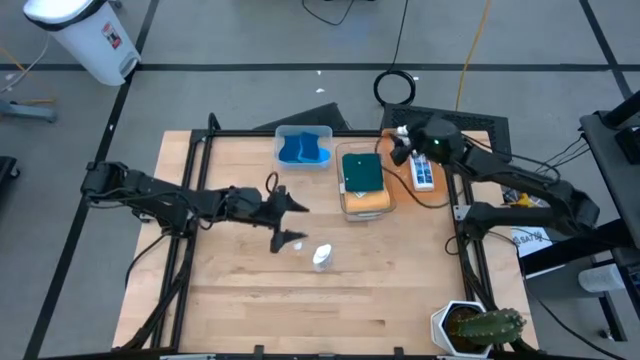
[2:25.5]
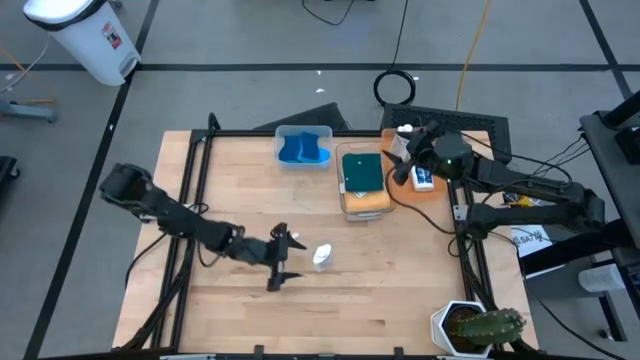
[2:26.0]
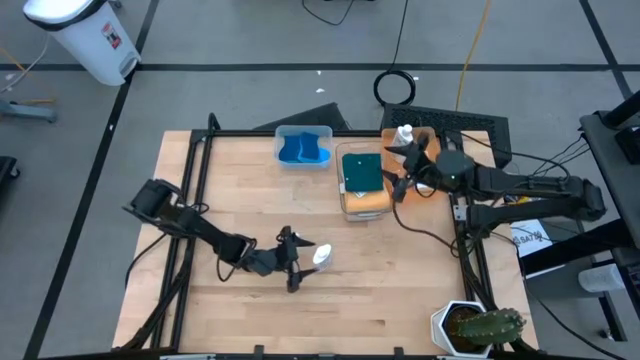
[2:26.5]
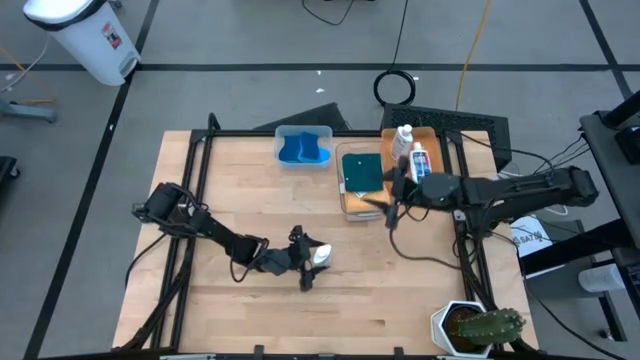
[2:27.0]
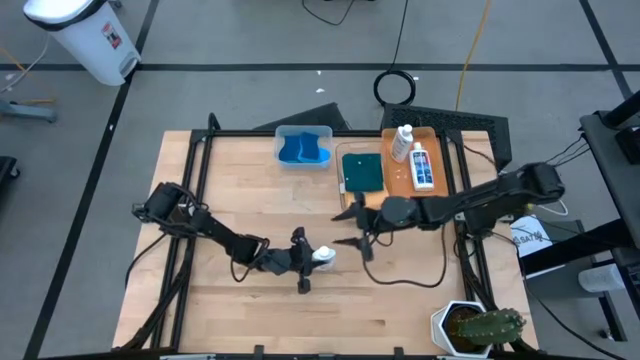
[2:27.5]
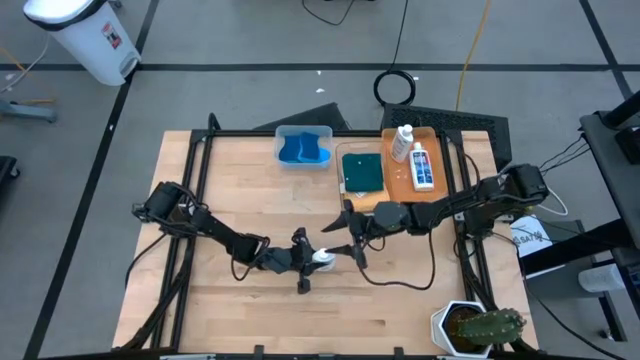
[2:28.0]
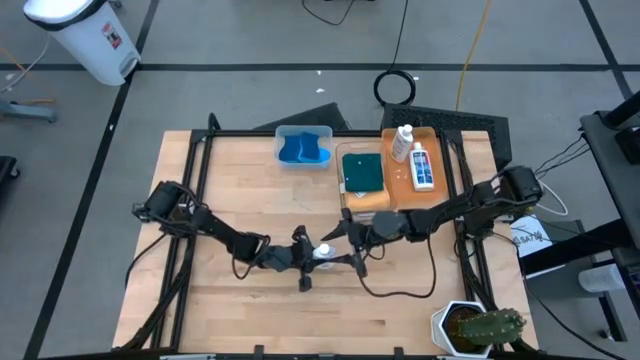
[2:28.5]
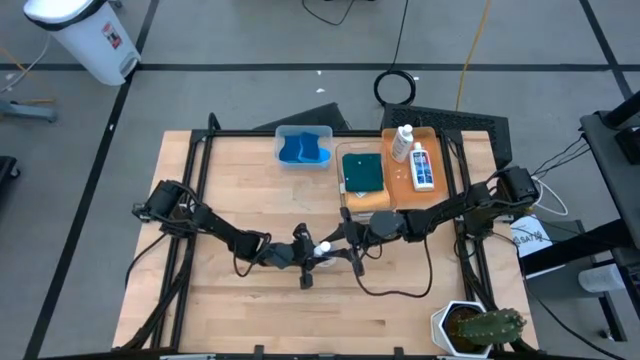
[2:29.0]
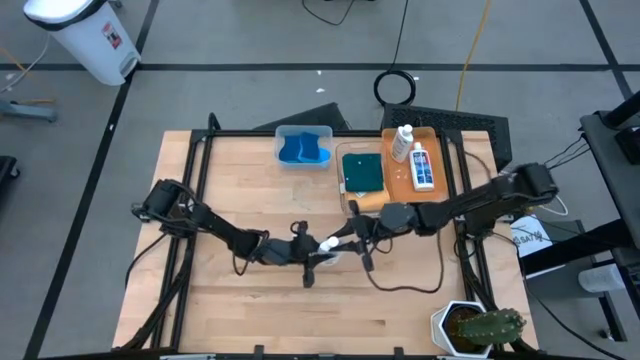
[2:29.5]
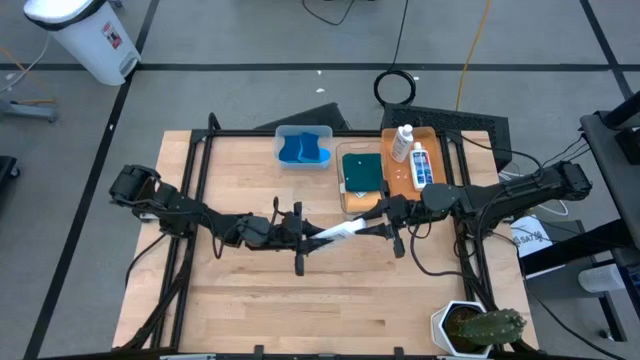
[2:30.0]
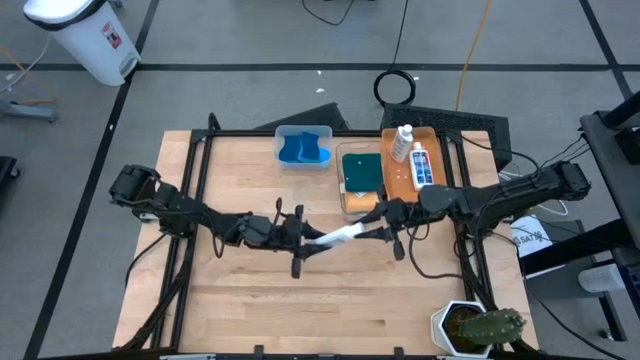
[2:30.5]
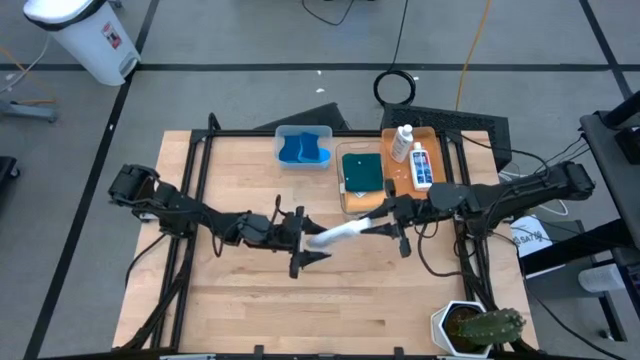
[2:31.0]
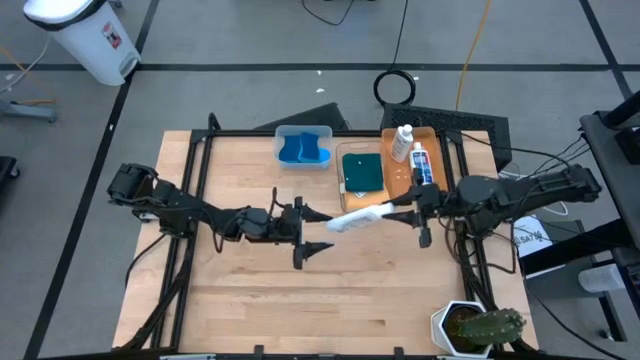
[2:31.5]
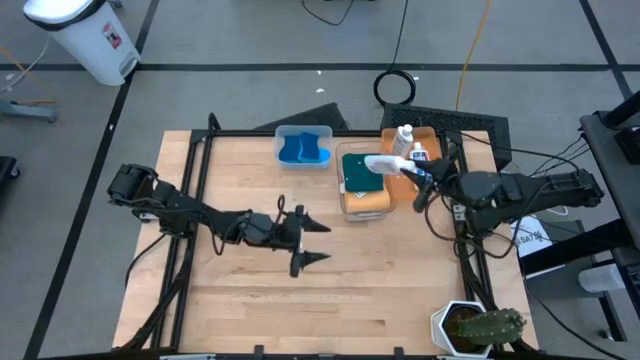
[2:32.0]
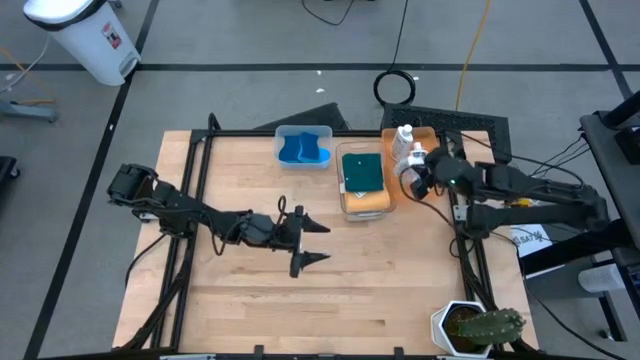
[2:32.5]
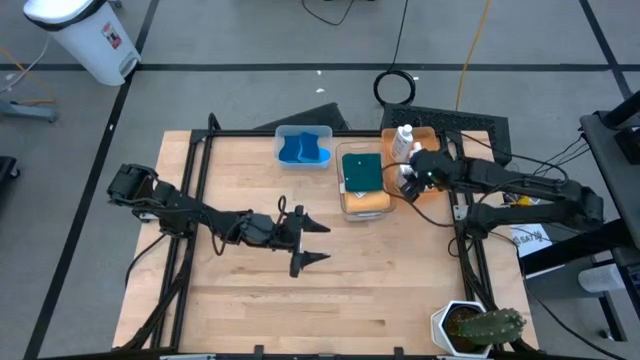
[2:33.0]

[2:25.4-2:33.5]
Task: Pick & Place Kitchen Items
Put the white plastic restorer bottle into the orange bin

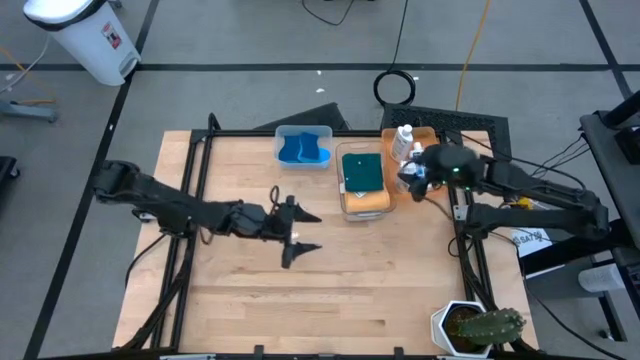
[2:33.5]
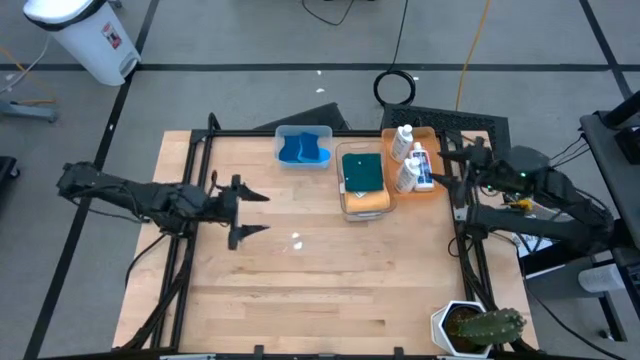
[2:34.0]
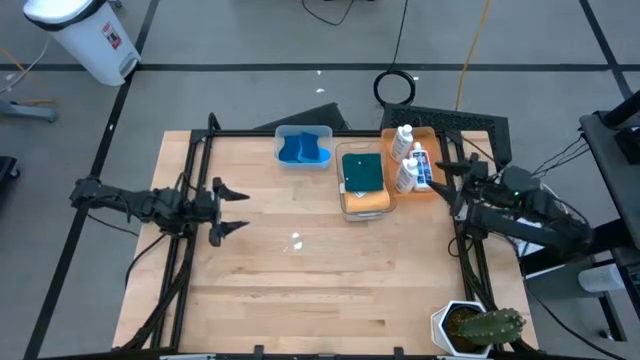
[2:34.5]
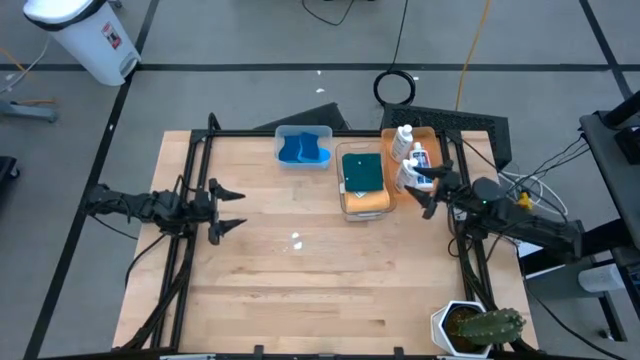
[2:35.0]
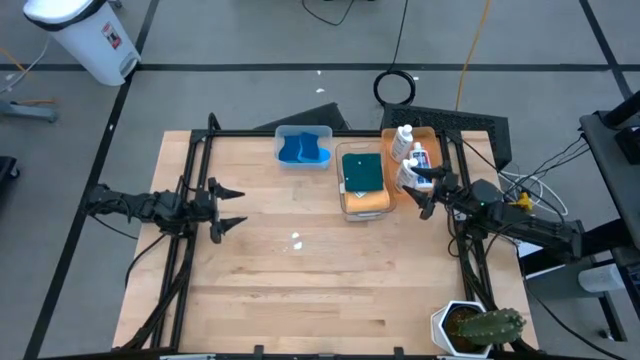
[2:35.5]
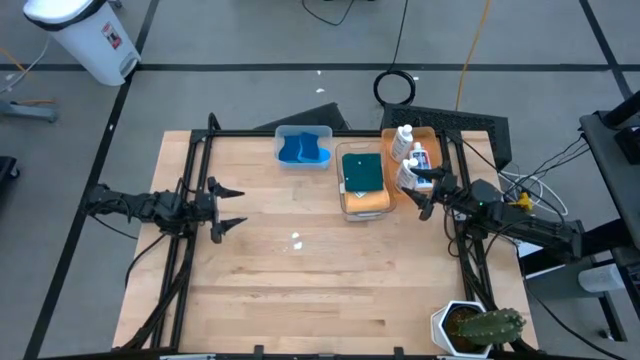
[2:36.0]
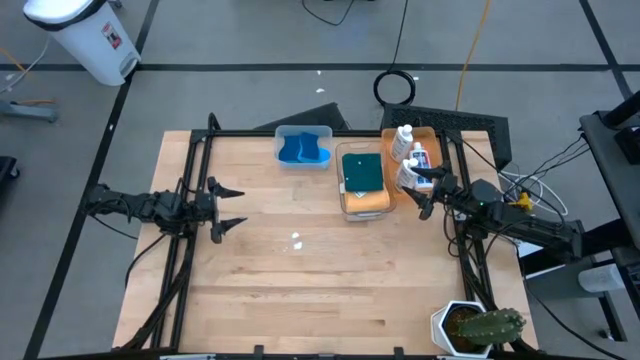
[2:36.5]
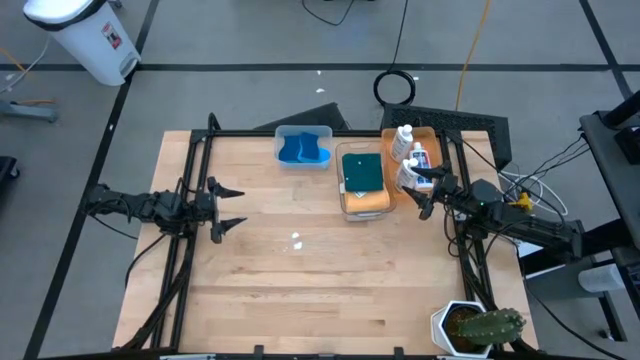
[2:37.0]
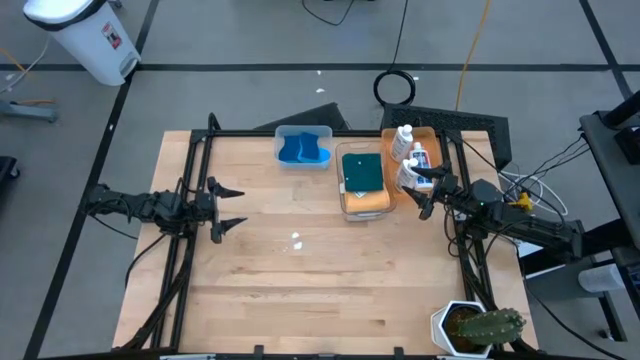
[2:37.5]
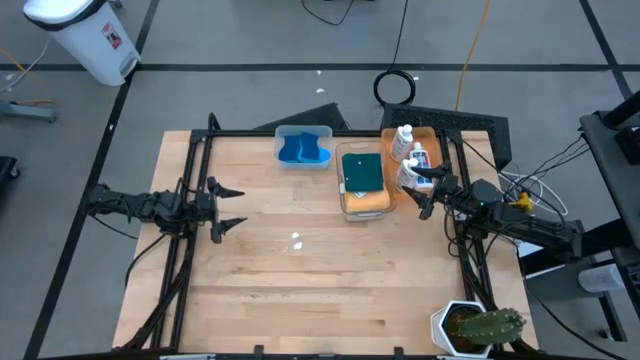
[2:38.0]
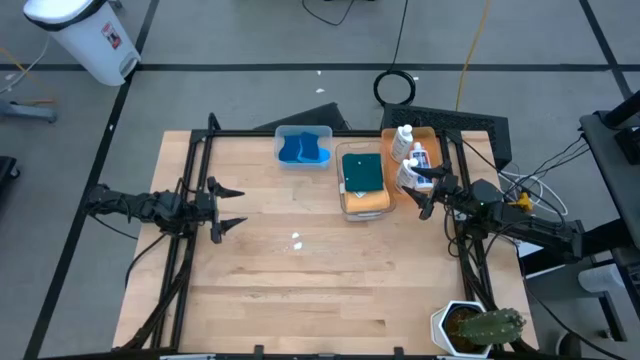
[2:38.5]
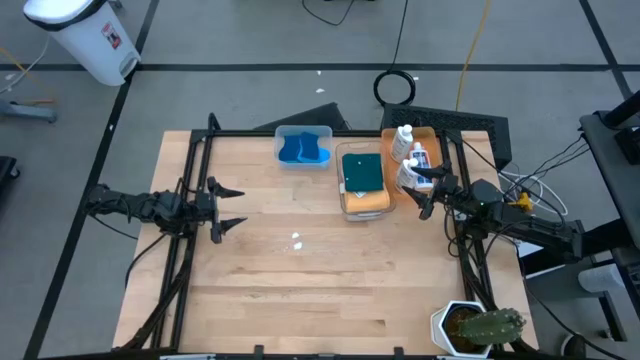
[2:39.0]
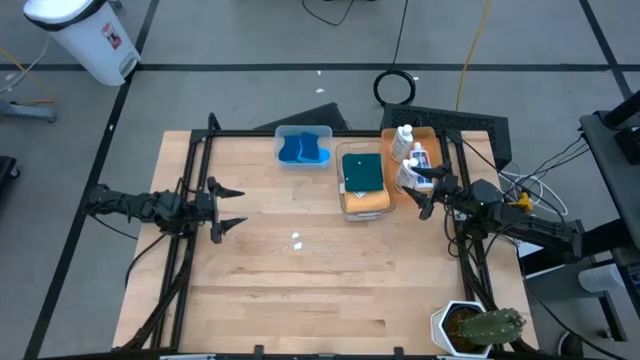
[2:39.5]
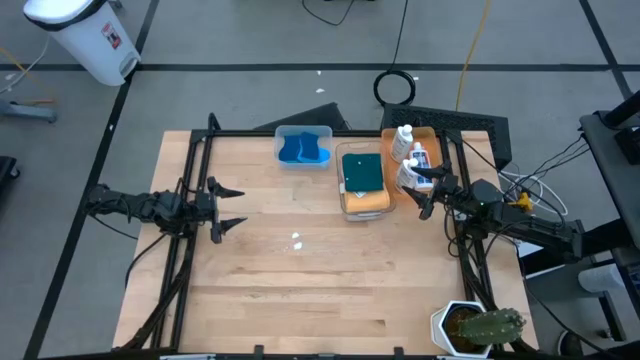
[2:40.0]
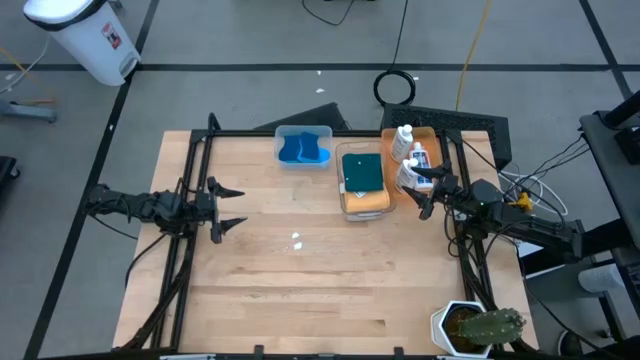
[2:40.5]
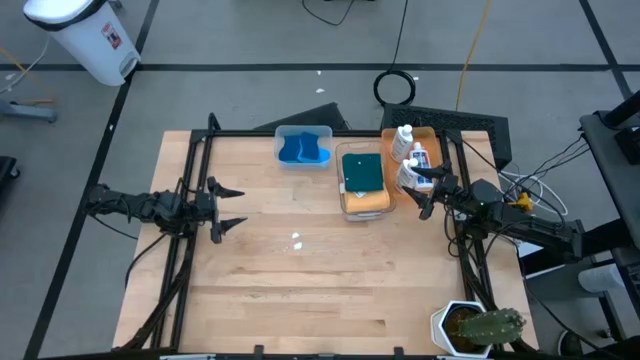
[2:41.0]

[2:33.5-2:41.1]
Return to Home Position

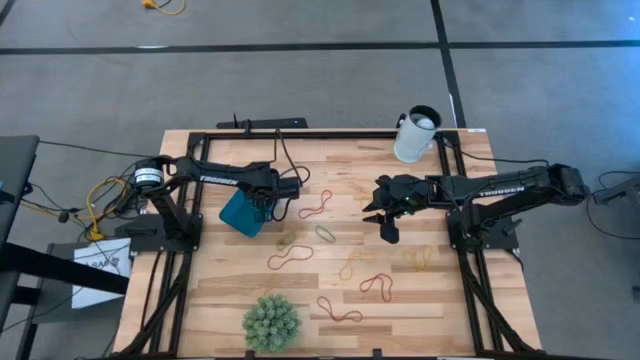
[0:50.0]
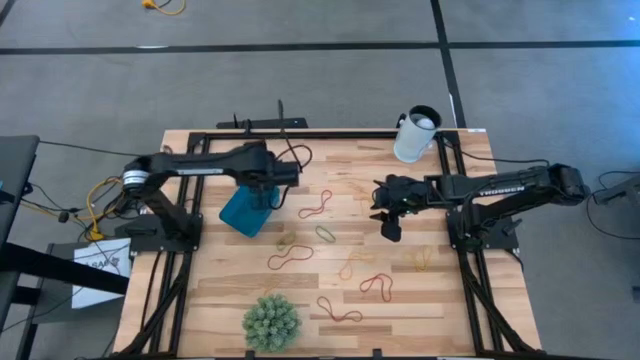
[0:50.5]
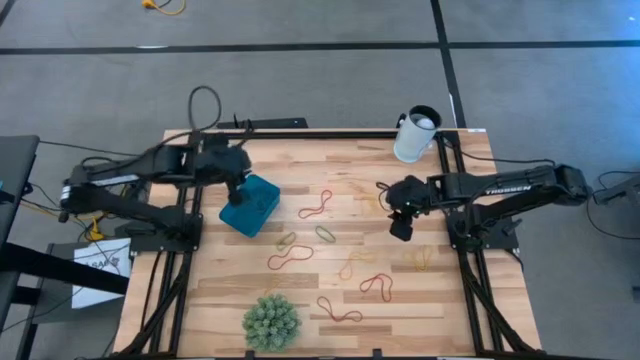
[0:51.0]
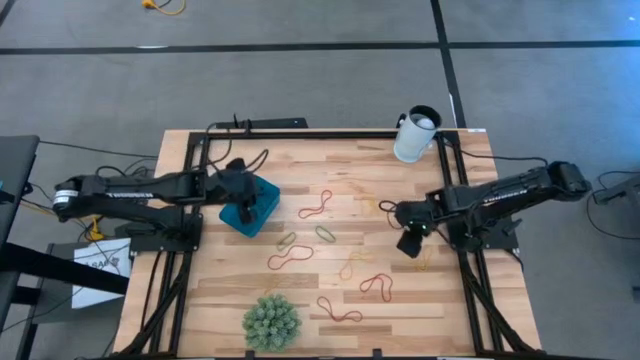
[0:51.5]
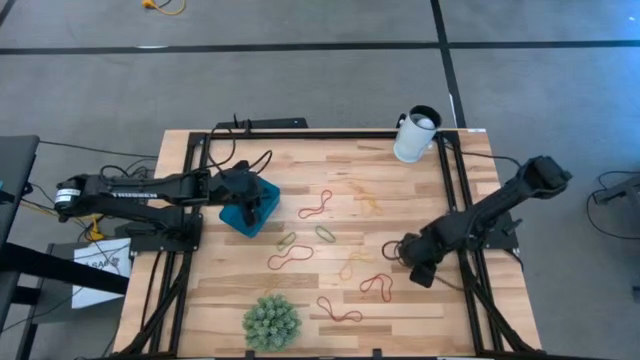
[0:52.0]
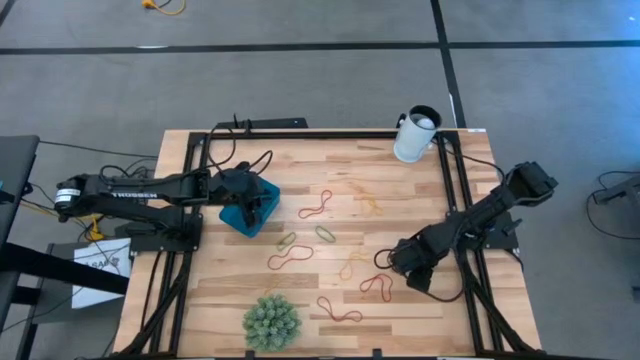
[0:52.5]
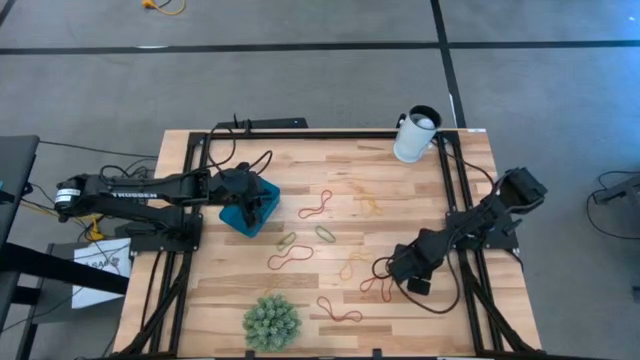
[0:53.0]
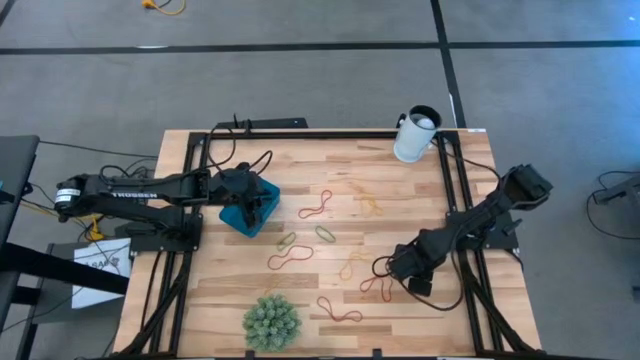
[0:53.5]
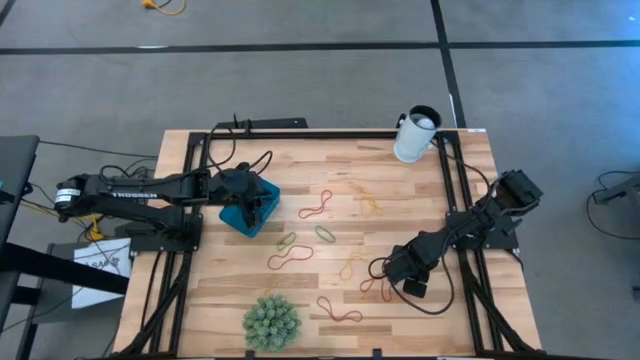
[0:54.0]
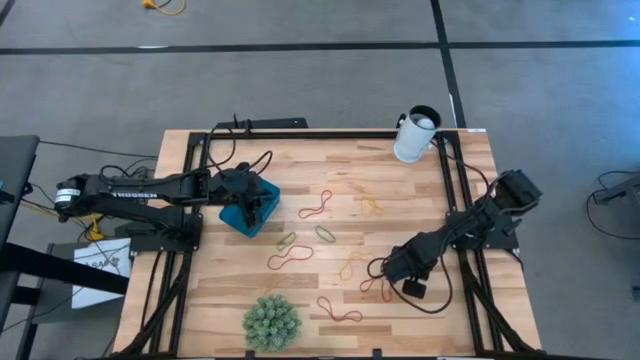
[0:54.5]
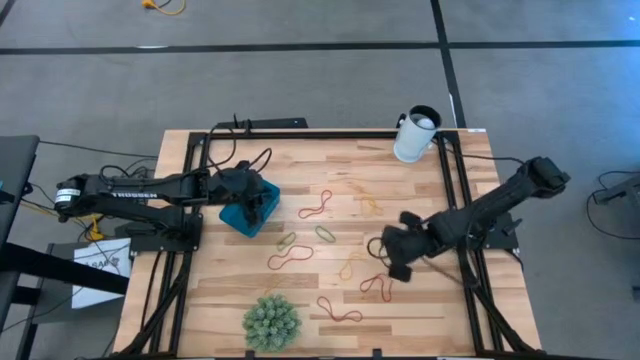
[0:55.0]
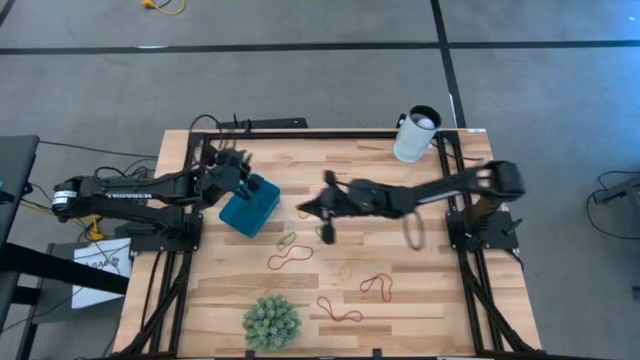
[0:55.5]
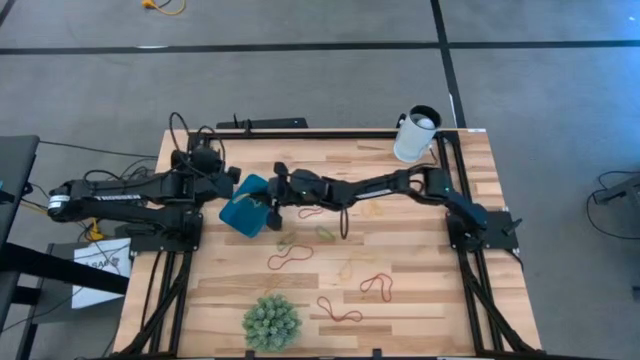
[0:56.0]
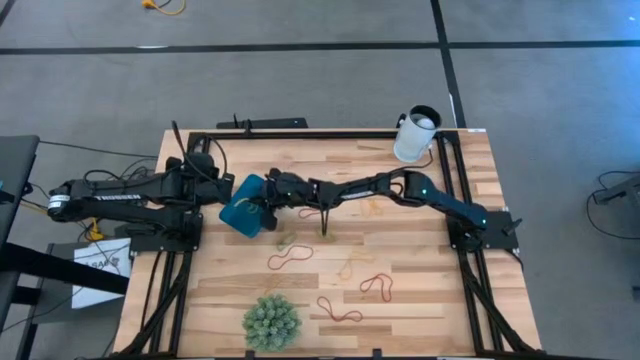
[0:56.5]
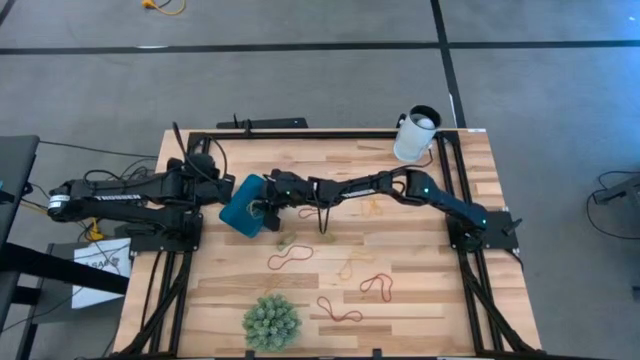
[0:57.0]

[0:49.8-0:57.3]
Task: Pick and place items into bin
Put the yellow rubber band into the blue bin
